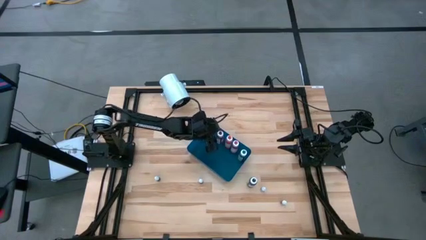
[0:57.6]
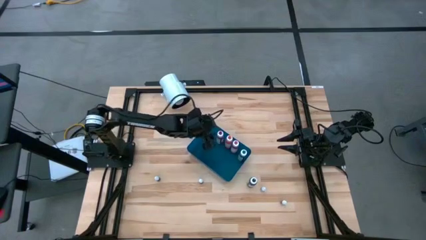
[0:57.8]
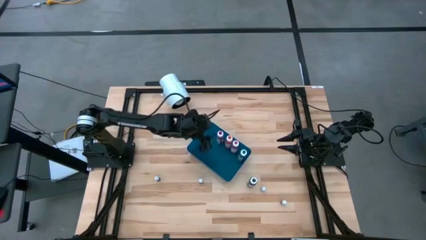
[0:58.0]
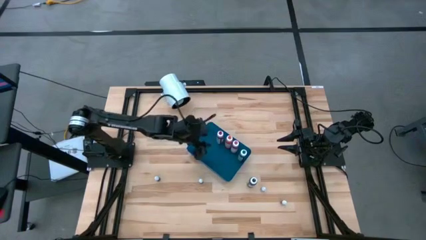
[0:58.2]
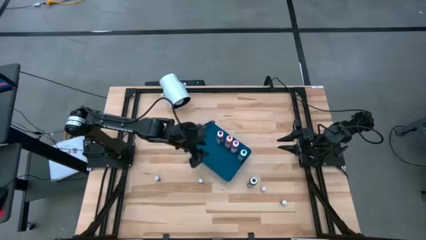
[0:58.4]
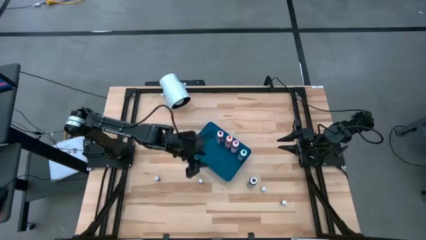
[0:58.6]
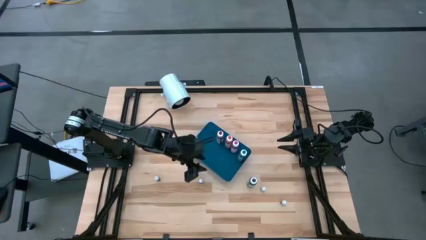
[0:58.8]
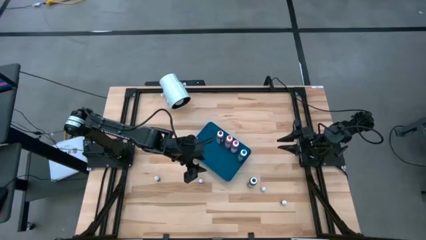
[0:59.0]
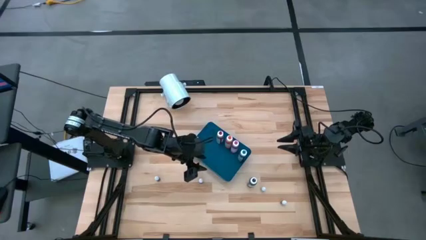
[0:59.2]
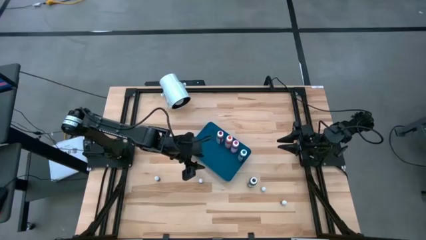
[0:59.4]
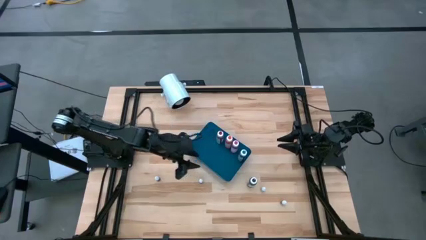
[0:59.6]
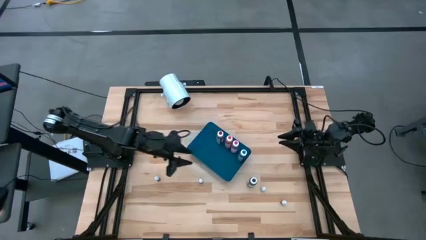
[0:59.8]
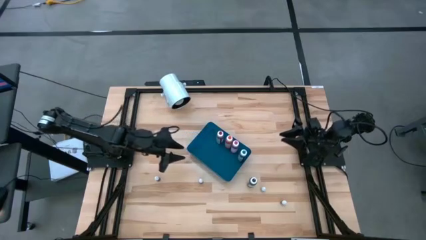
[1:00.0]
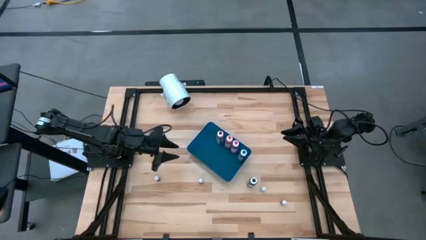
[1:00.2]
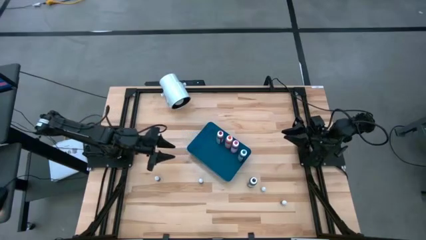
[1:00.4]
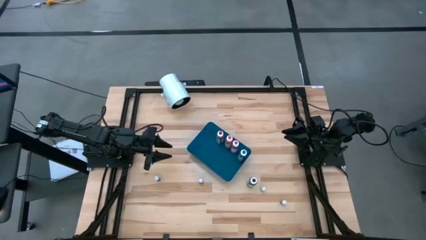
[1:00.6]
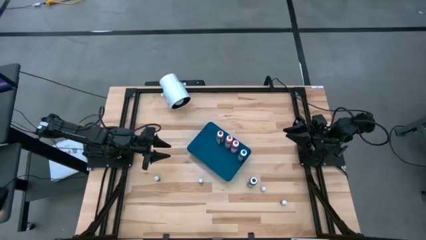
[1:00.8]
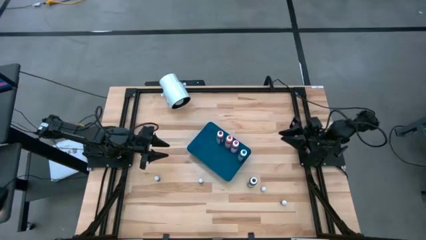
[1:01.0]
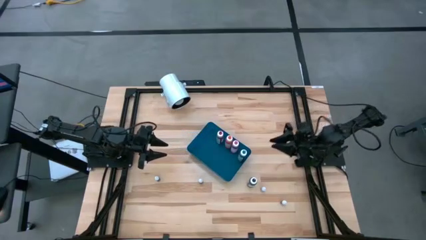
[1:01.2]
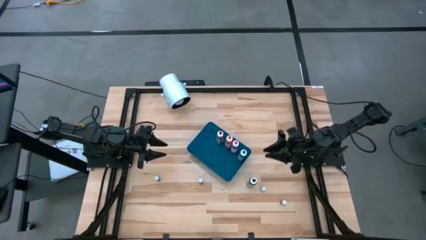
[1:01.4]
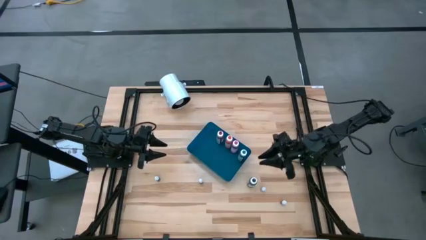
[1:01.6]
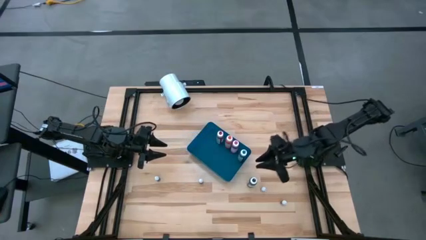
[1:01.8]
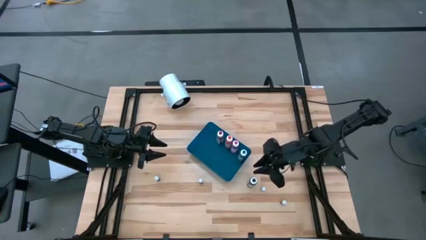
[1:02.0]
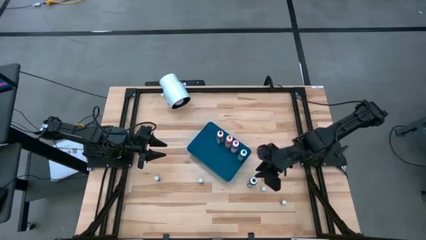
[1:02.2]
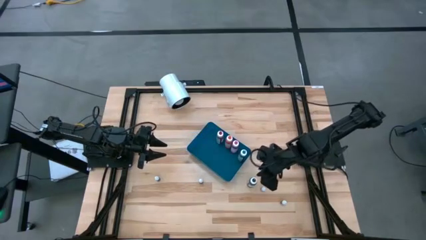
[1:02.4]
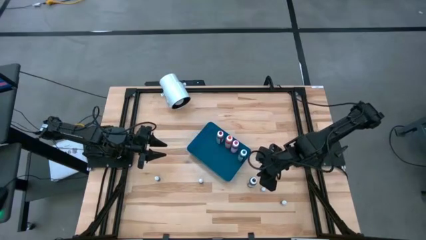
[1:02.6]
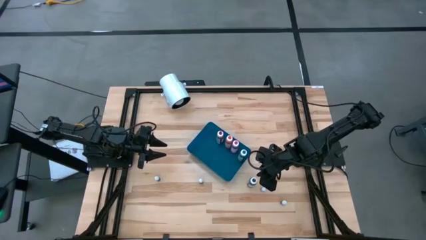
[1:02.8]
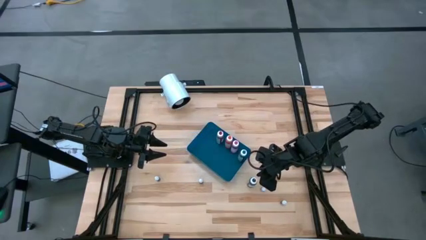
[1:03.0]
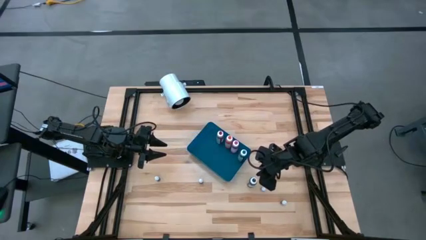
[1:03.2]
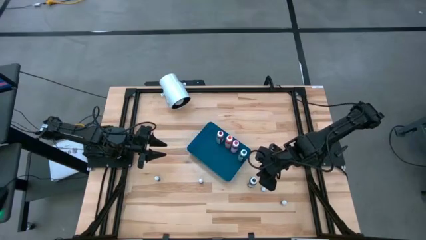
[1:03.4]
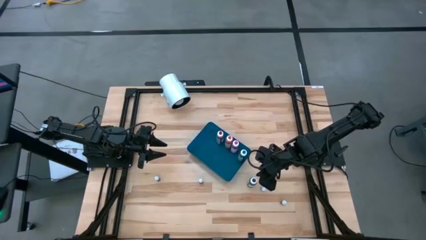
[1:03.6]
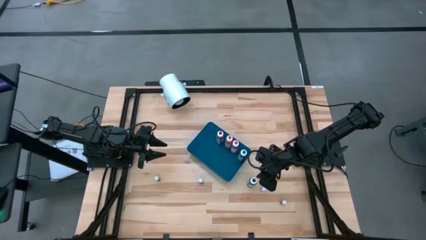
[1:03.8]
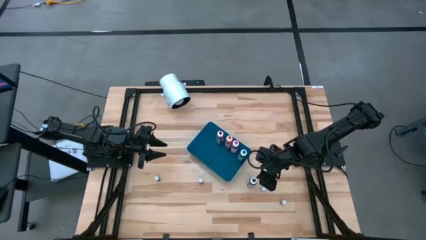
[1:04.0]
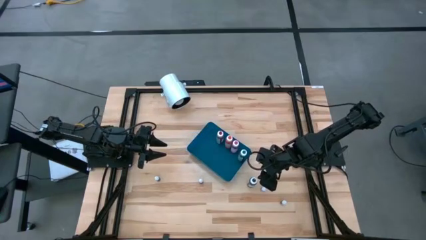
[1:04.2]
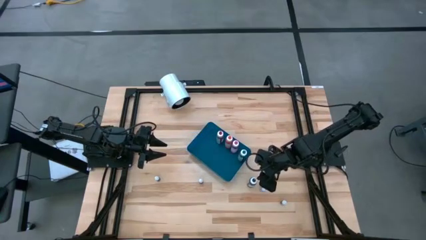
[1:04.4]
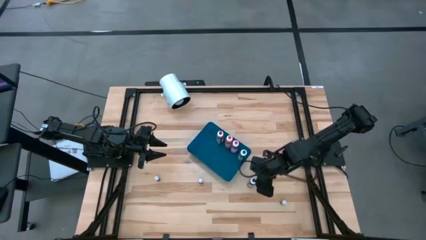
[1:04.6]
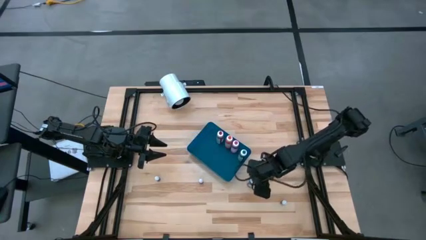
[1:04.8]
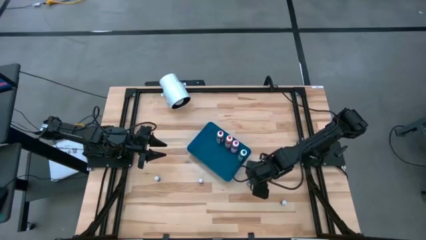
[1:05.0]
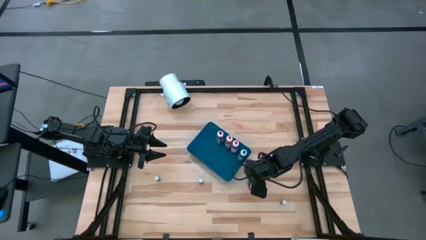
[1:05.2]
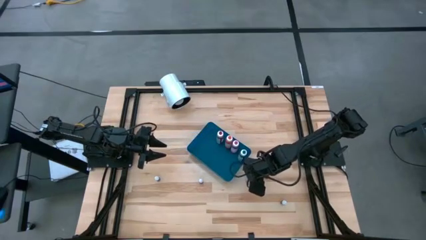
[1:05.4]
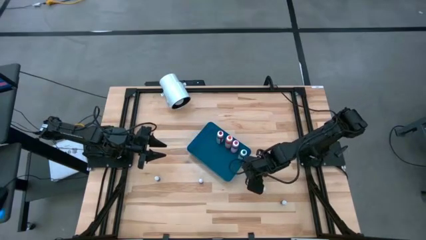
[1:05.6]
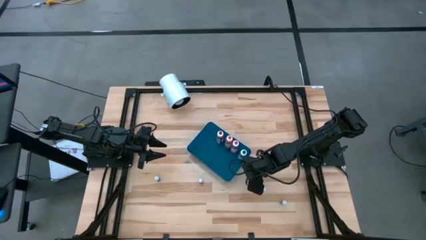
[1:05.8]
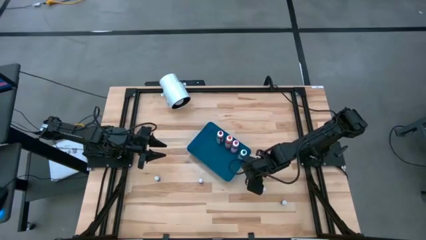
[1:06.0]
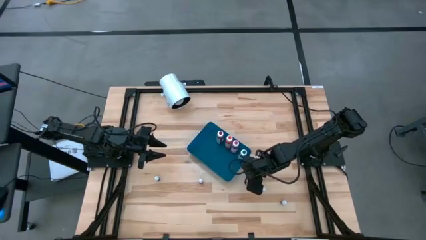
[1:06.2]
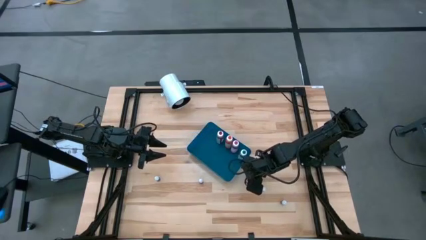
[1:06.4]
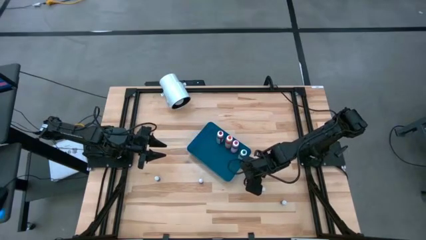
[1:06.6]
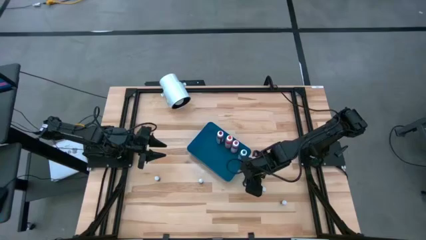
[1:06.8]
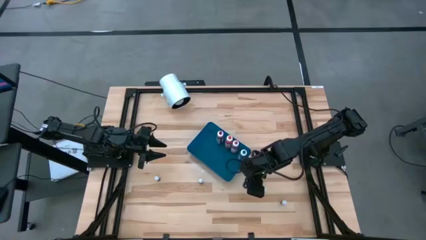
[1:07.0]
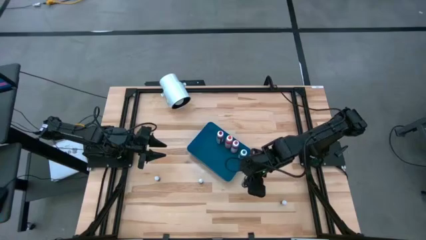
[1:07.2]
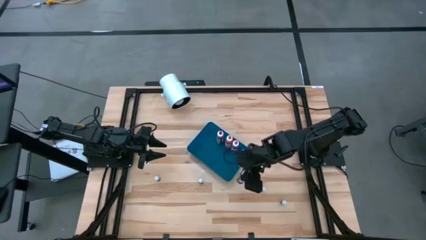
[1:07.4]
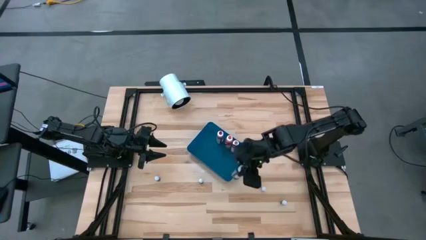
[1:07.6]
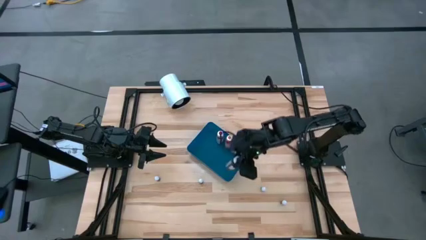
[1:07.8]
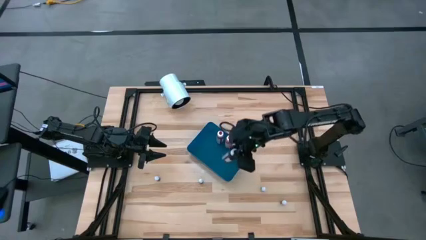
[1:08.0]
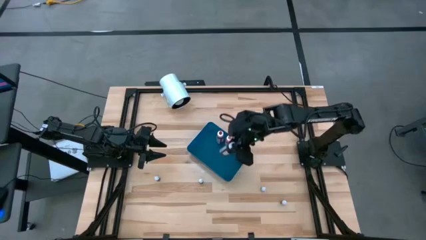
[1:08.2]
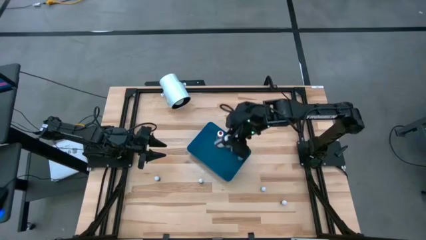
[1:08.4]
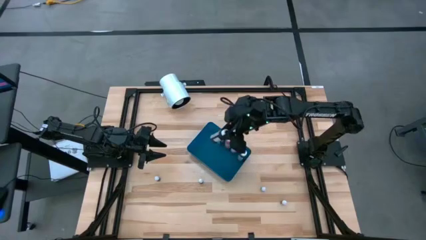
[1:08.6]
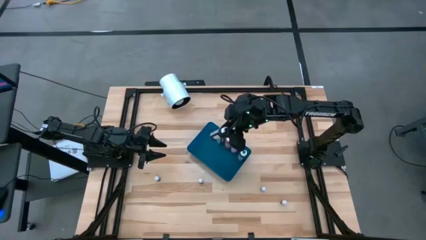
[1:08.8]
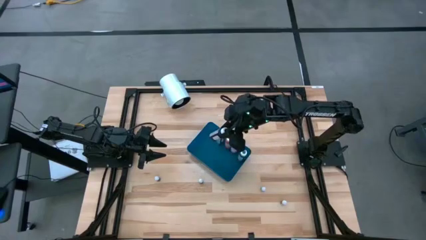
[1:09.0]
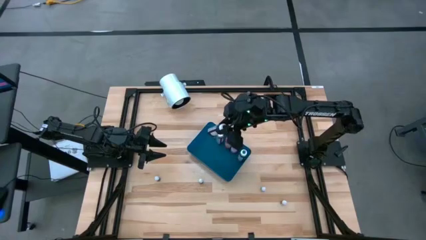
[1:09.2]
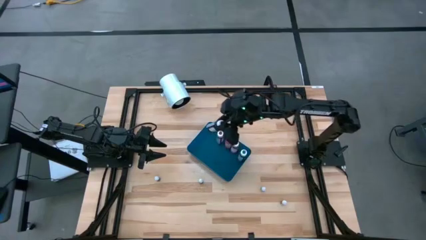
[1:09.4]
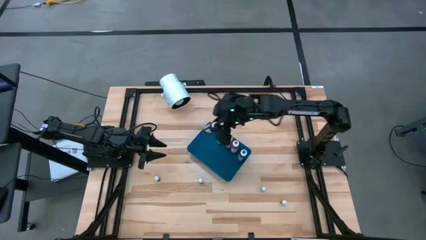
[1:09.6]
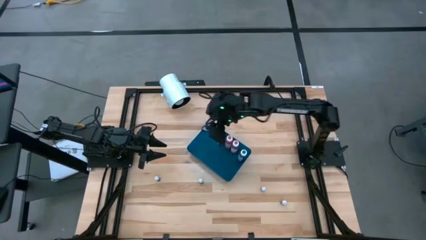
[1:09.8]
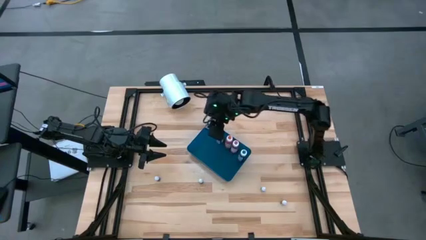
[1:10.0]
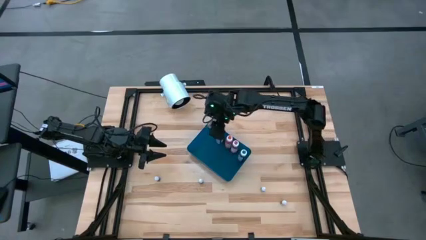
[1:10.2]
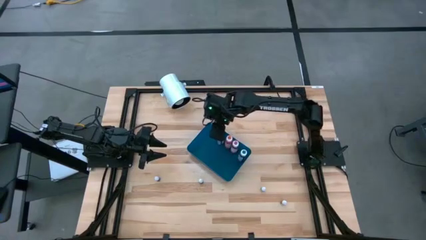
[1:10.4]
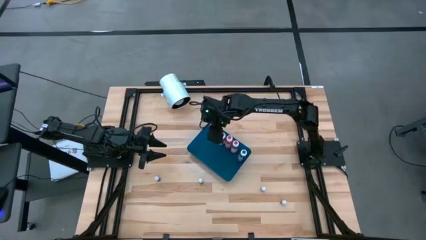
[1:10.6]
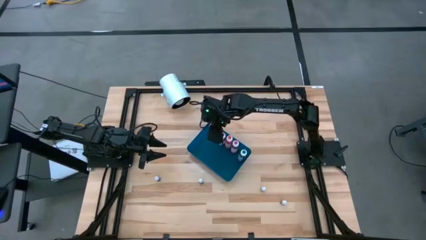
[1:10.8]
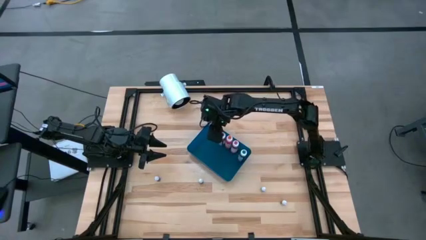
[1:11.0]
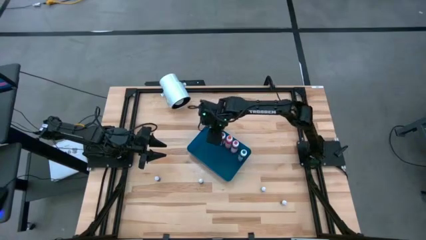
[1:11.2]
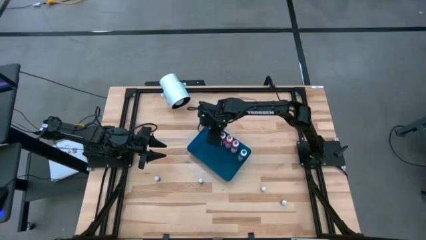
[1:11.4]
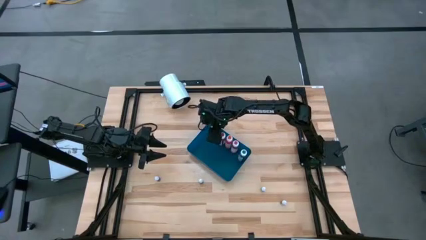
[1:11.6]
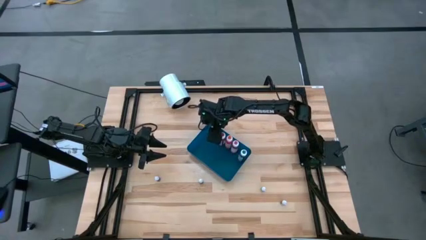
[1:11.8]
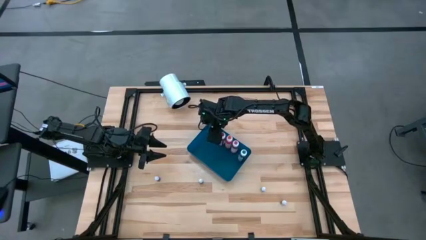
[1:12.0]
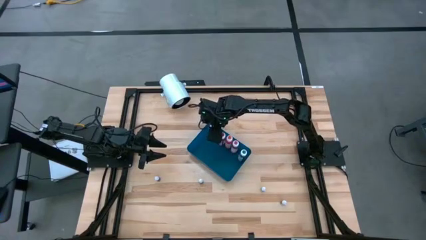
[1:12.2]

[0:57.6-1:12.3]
Task: Pick & Place food coloring
Put the big black food coloring bottle into the blue bin
